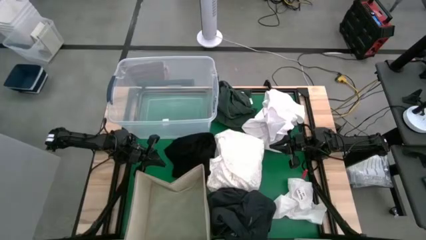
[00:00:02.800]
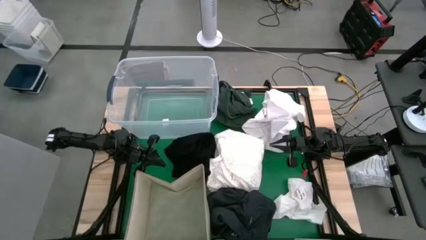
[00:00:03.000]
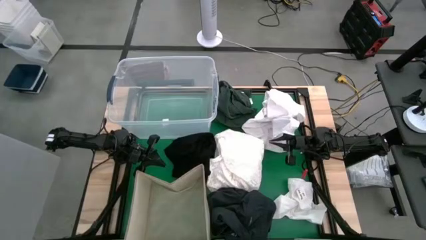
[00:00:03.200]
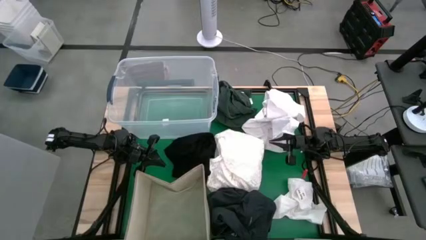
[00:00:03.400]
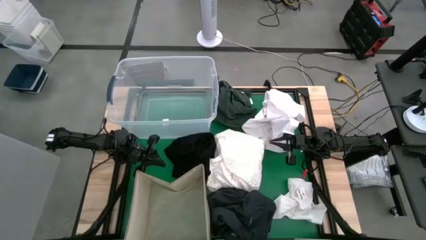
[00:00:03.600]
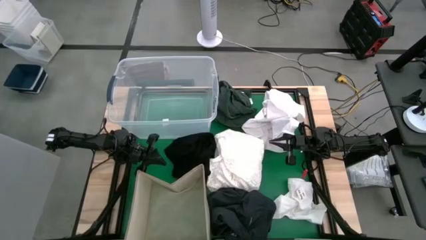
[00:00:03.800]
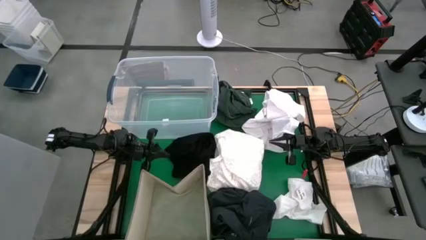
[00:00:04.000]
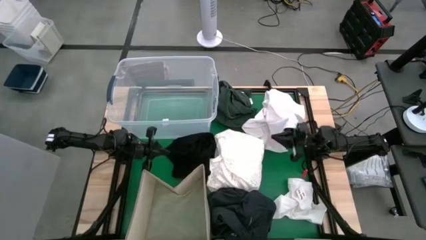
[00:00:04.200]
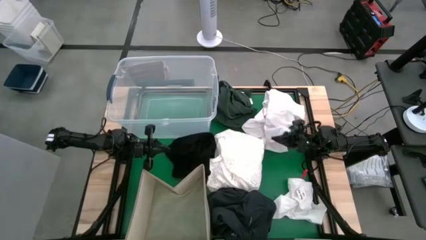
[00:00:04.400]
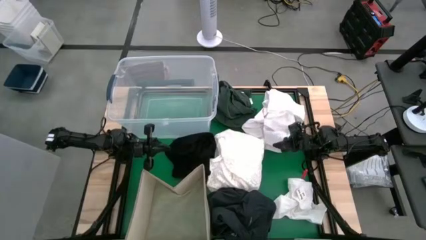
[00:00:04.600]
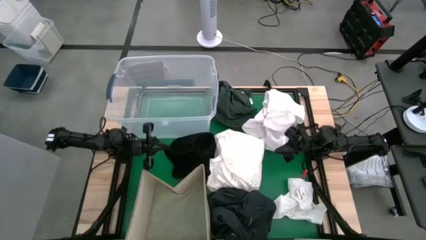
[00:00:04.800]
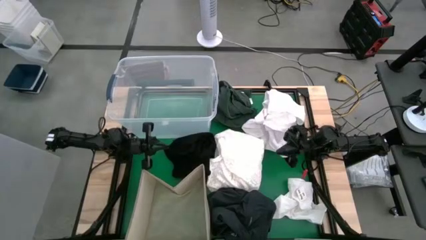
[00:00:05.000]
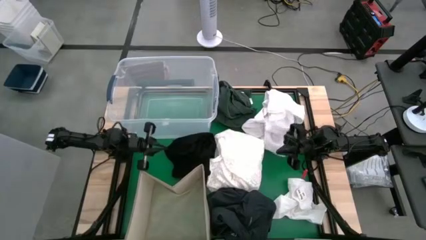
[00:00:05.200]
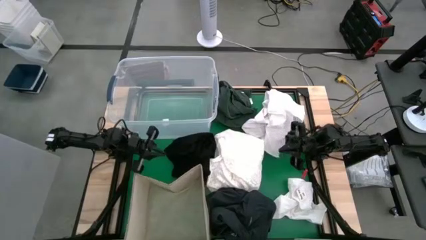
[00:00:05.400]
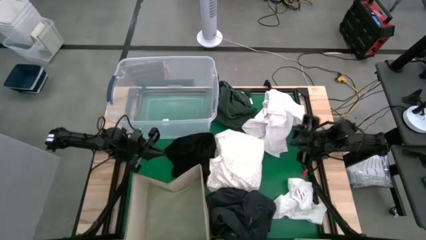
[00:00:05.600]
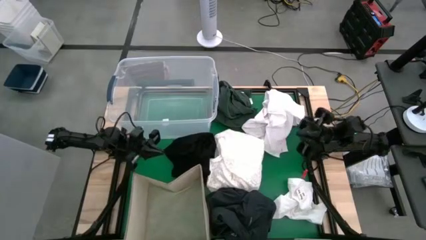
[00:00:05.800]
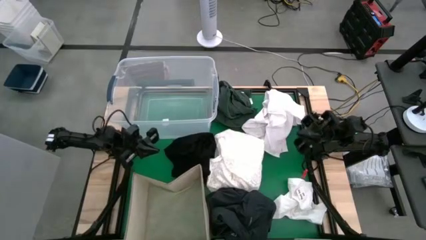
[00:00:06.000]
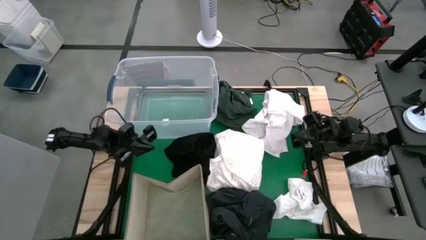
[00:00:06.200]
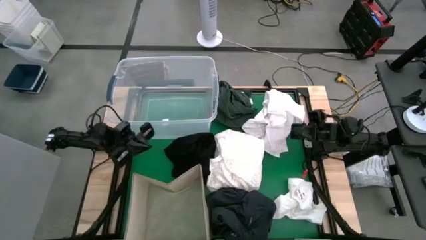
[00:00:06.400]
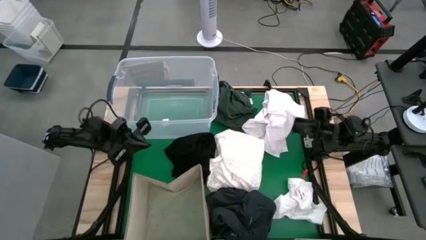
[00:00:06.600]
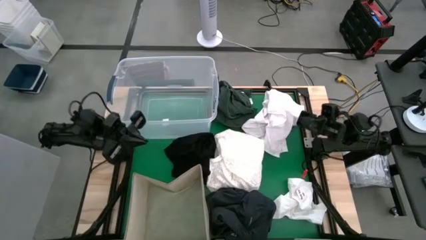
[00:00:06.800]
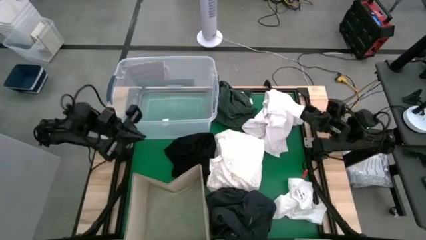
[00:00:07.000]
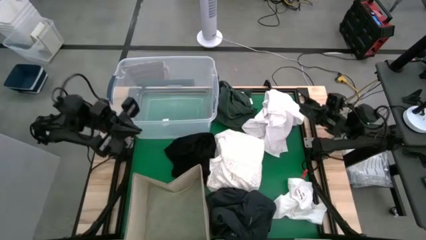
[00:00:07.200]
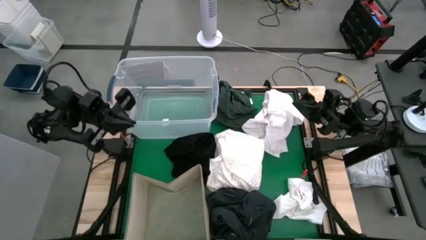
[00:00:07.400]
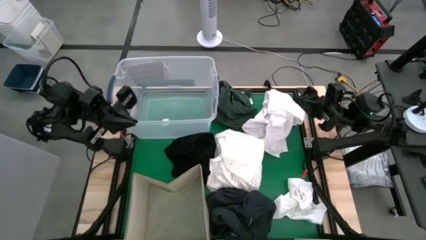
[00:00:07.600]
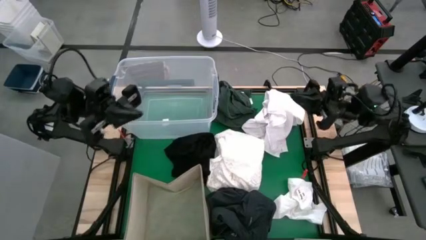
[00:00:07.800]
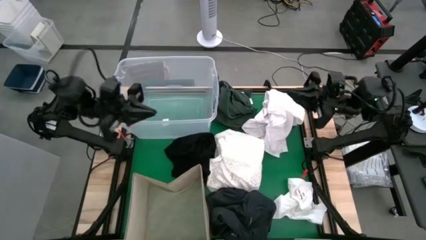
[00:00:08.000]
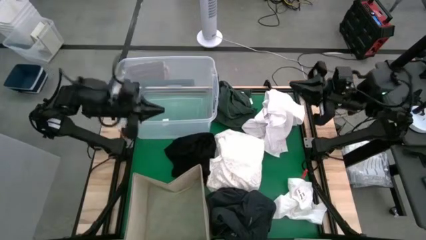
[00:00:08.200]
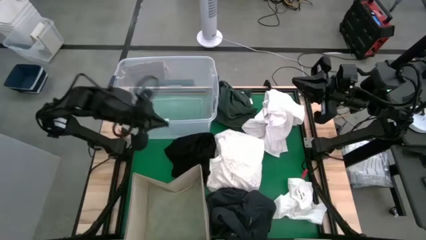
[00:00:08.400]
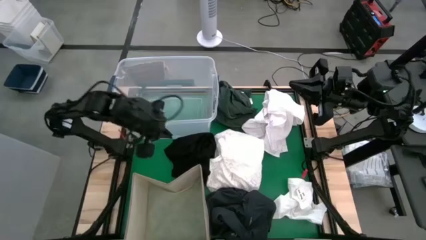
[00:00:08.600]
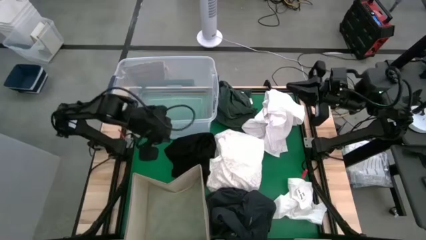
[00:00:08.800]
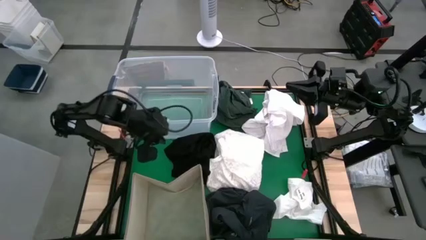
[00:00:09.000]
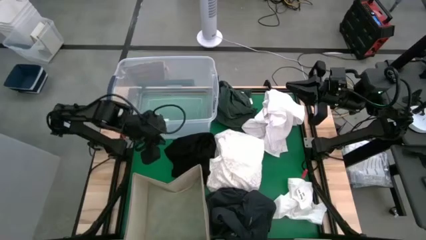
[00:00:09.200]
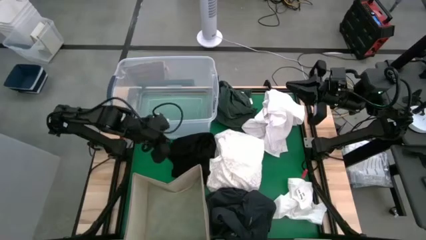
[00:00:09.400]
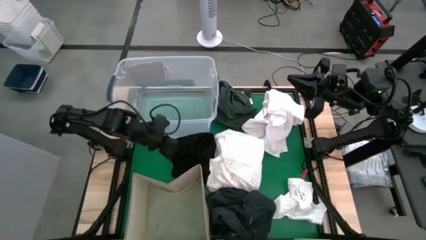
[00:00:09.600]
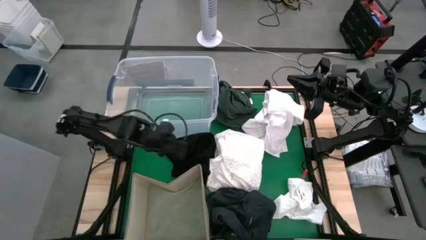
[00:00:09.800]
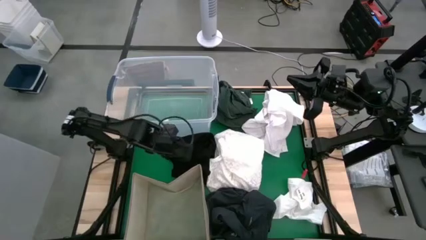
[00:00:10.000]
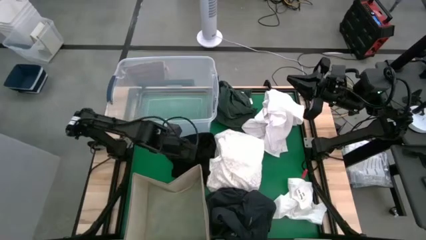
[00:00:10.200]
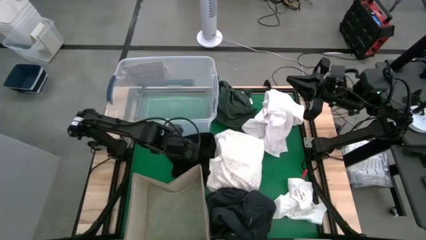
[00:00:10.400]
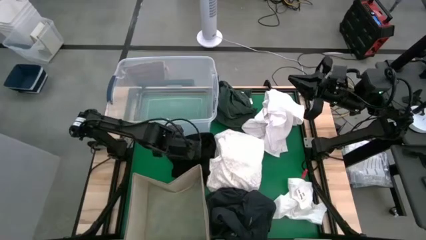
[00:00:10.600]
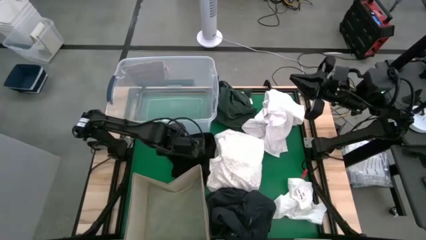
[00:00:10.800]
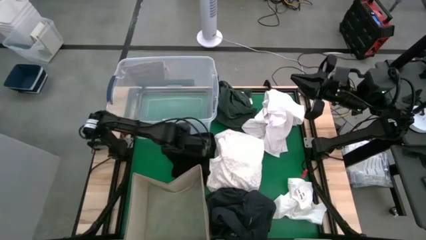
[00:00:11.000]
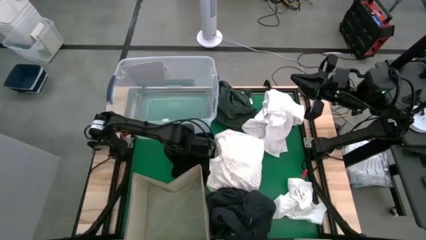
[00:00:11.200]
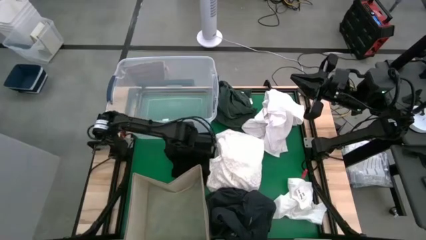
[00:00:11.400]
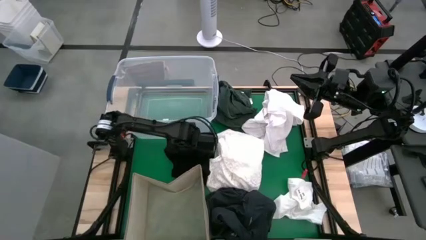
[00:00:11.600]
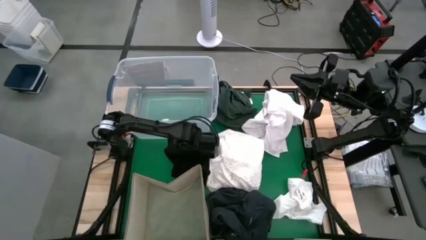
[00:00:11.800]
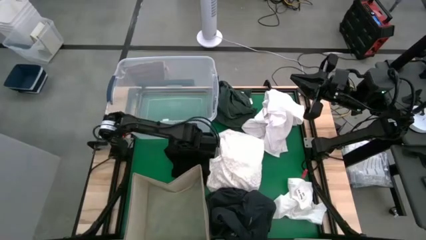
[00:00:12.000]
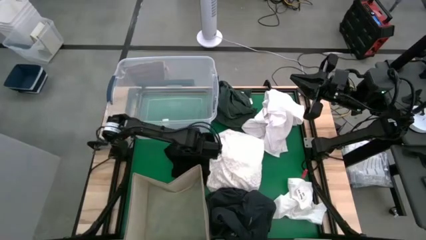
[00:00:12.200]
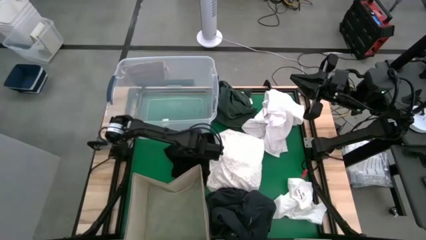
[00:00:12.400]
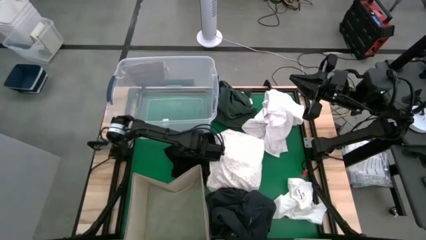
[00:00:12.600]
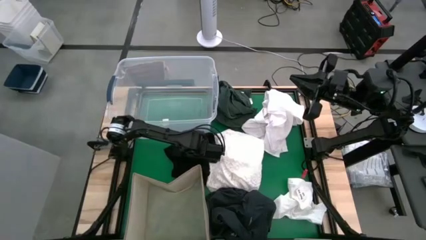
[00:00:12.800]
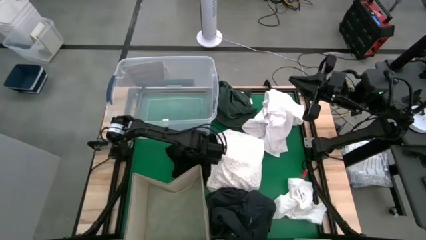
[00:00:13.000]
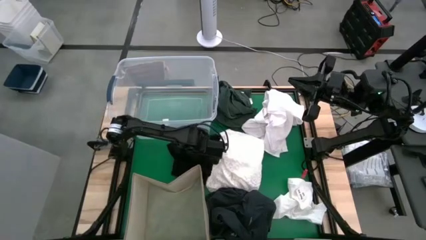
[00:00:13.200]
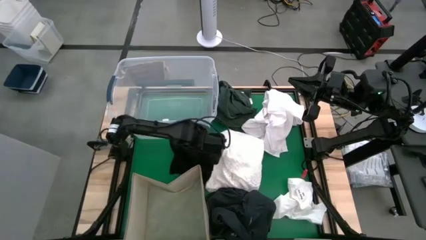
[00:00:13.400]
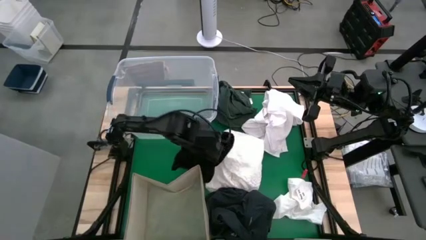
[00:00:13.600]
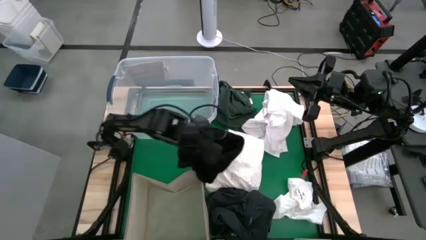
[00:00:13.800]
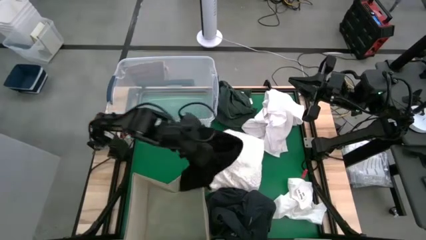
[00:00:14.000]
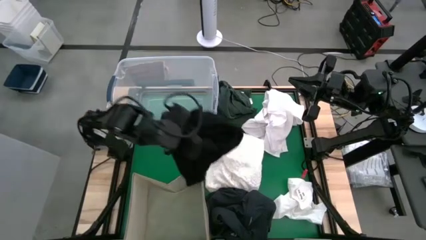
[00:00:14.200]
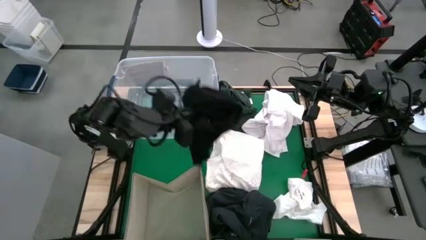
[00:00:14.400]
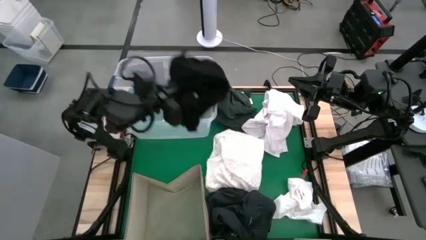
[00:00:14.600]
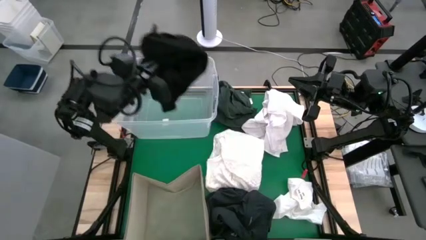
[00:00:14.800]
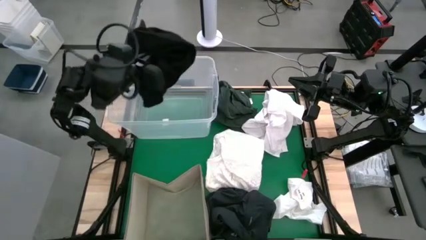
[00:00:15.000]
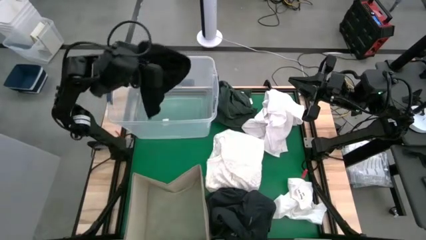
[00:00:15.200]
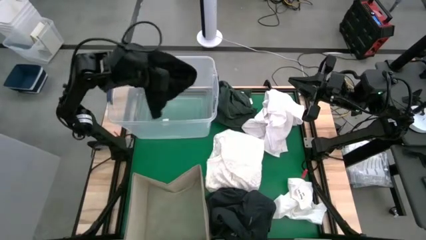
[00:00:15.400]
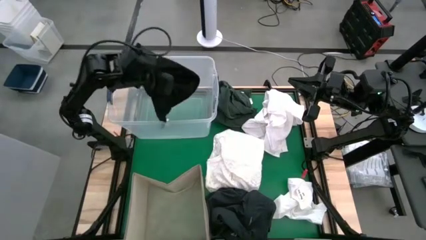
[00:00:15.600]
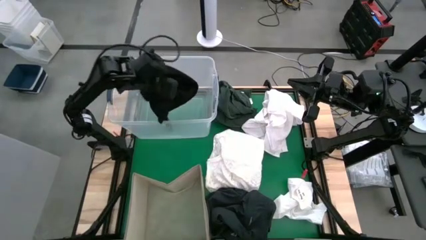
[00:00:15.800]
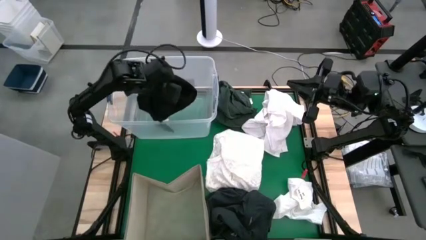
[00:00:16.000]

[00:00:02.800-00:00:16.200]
Task: Sort clothes
Put the black shirt into the transparent bin
